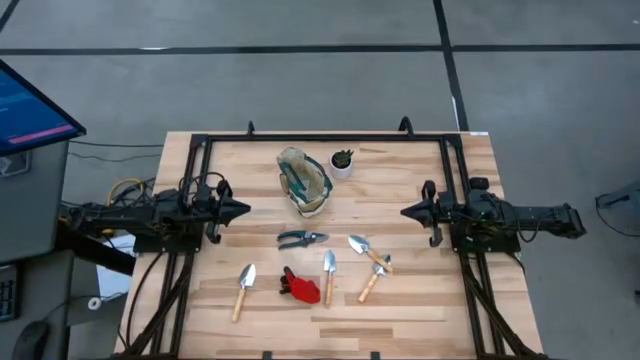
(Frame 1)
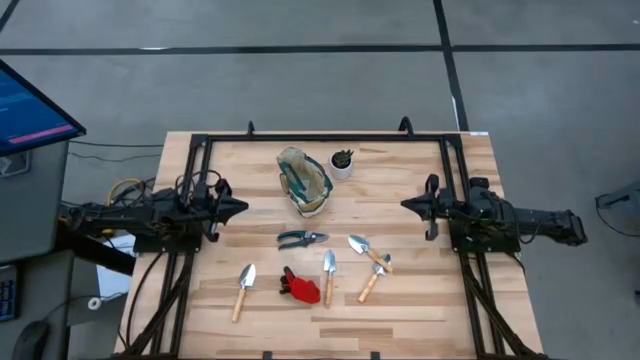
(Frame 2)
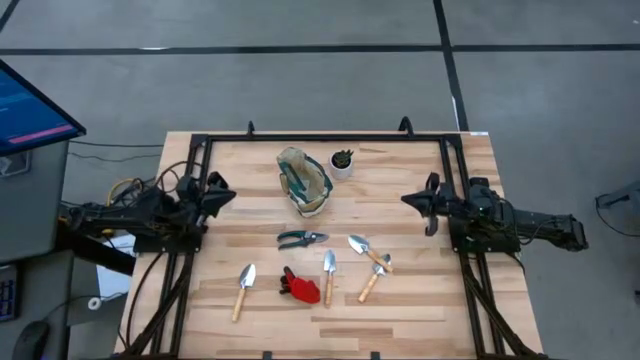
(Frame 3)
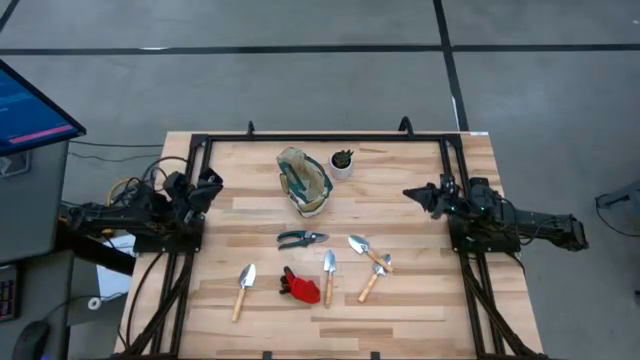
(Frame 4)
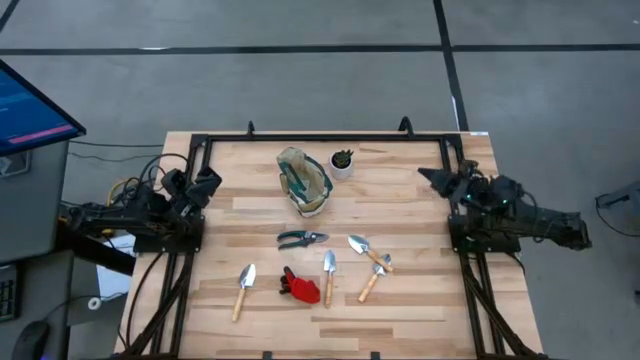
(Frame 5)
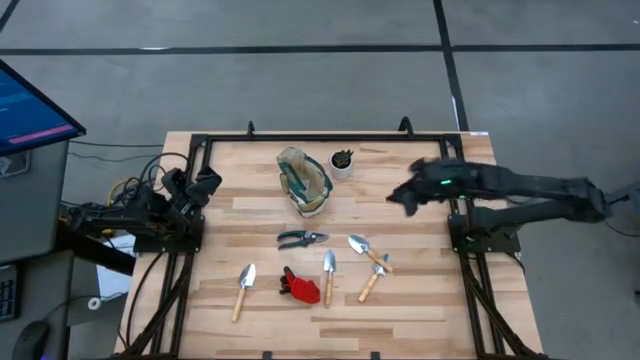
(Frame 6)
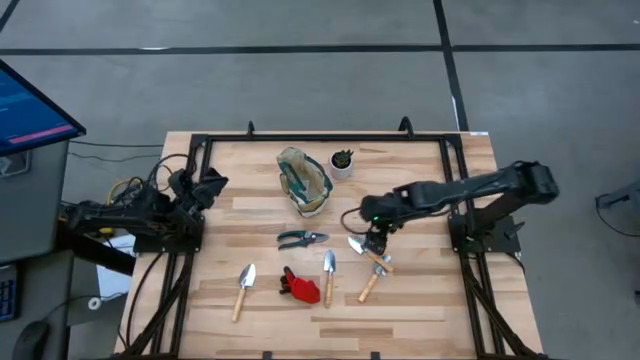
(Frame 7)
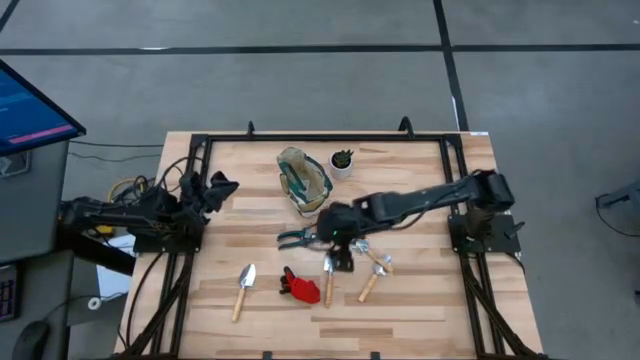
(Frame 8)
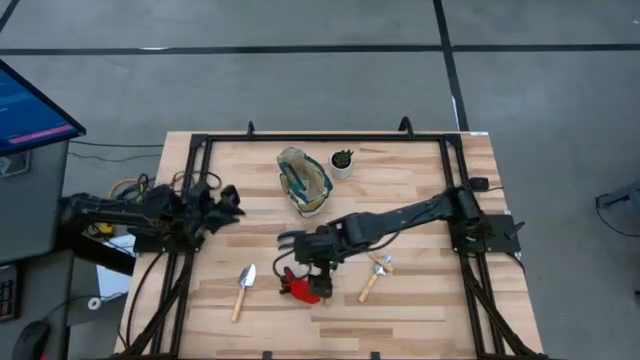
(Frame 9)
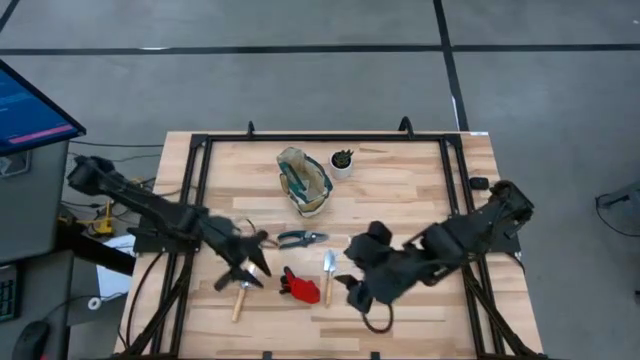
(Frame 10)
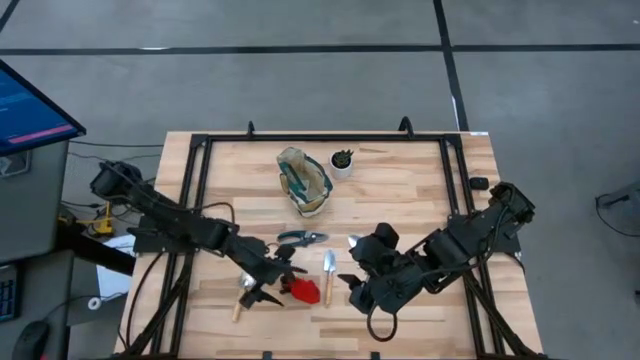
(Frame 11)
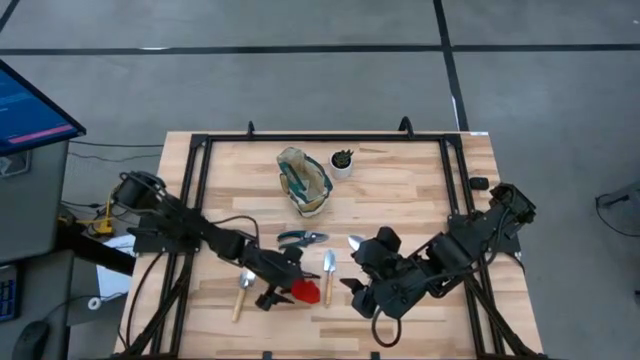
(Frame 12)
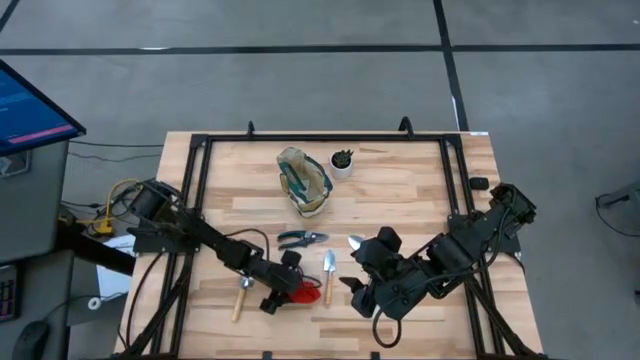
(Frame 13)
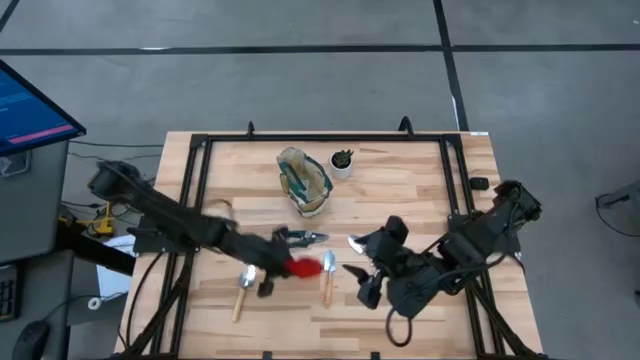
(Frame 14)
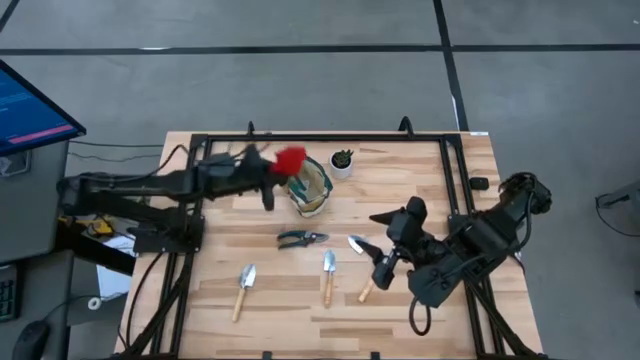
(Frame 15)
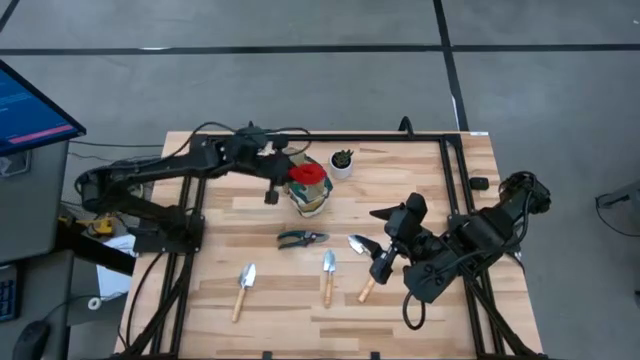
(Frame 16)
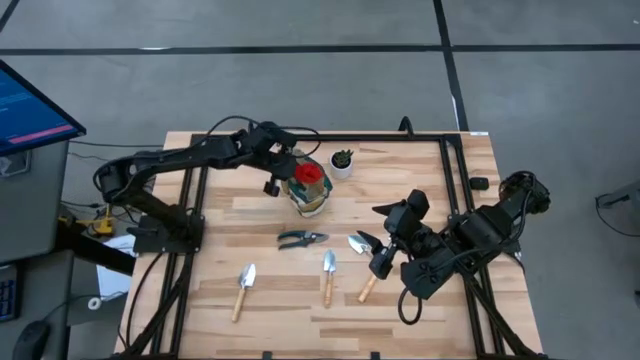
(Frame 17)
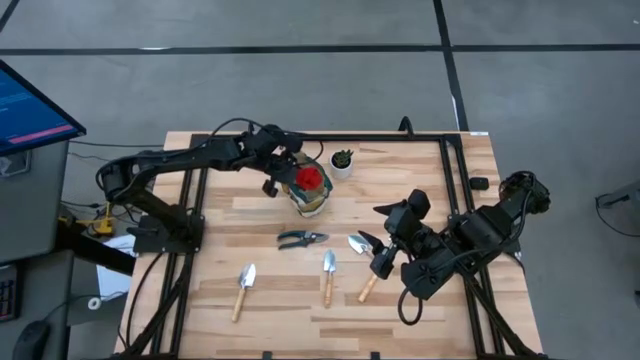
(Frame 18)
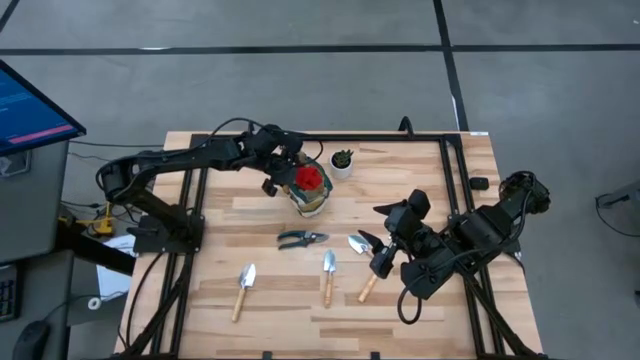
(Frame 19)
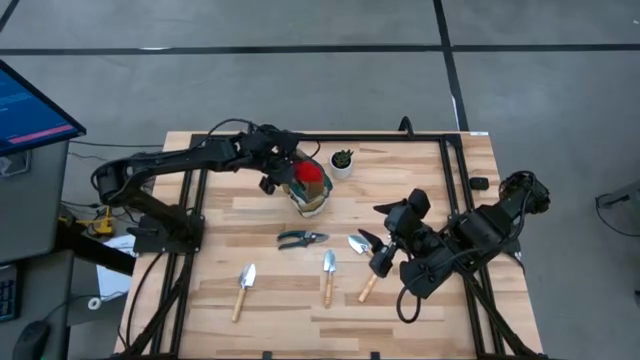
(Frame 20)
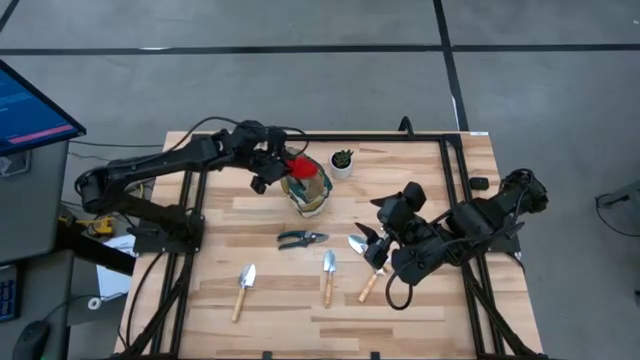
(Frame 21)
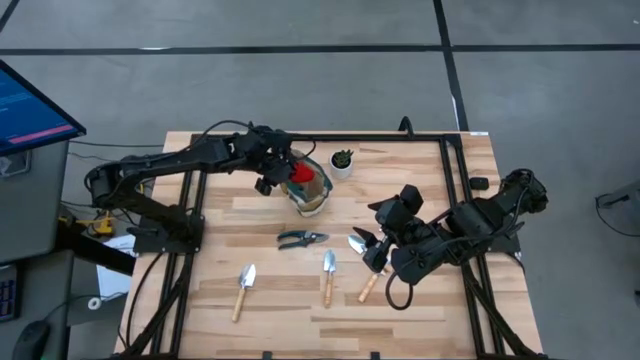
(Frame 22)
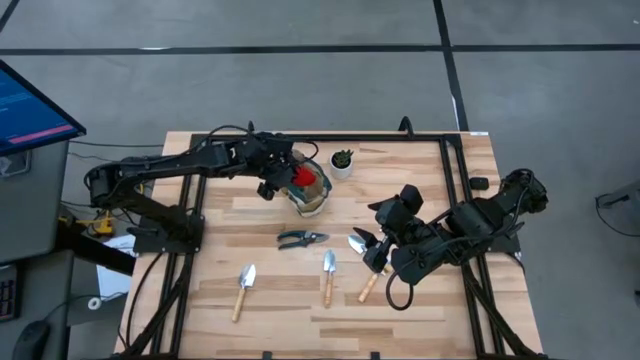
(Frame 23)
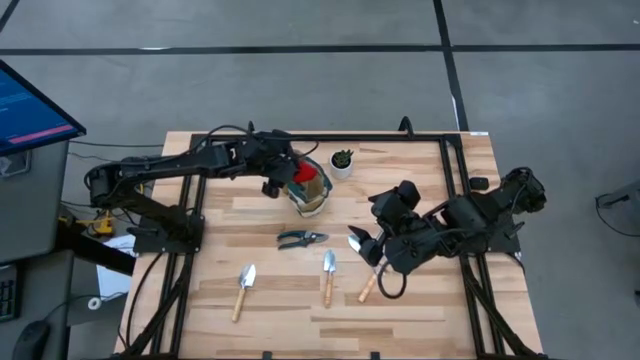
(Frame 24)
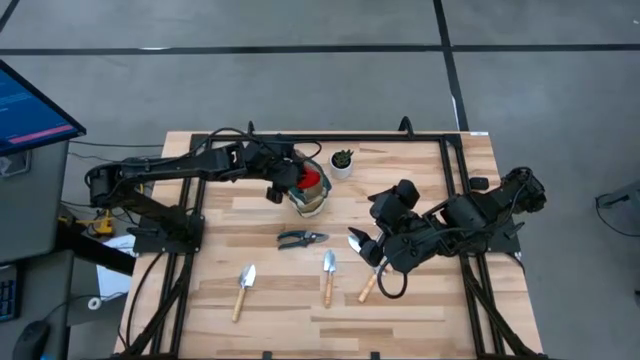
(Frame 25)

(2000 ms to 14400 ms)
Task: Pick & Place Garden tools in Gardening bag
Put the red gloves into the white gardening bag

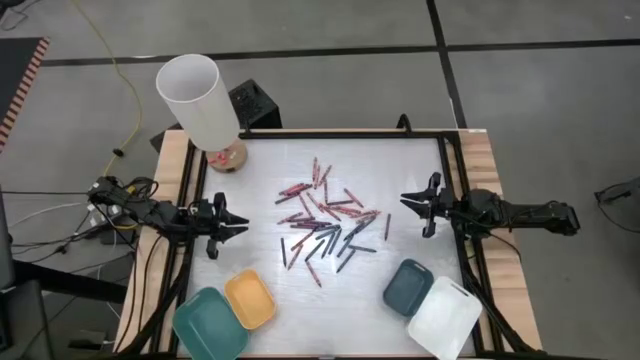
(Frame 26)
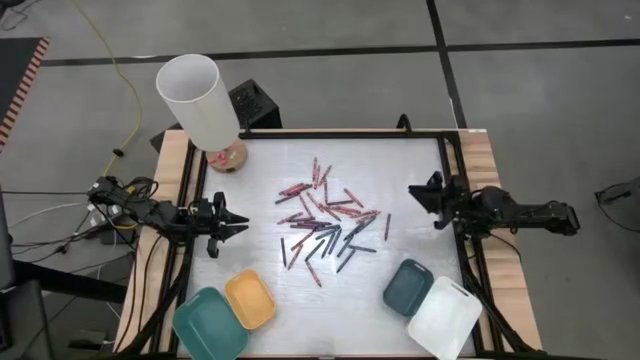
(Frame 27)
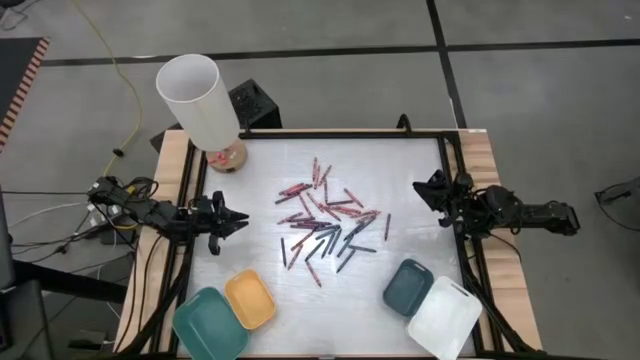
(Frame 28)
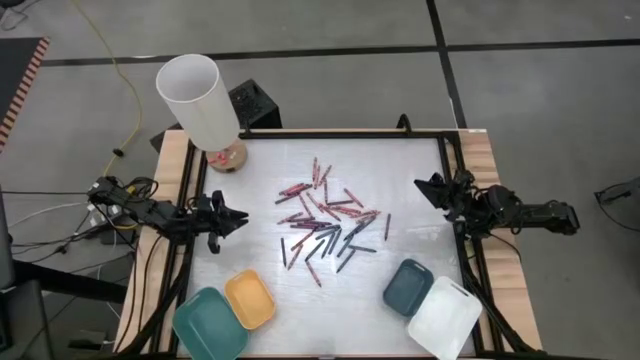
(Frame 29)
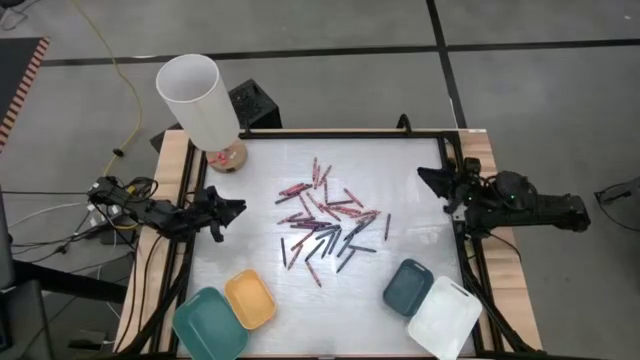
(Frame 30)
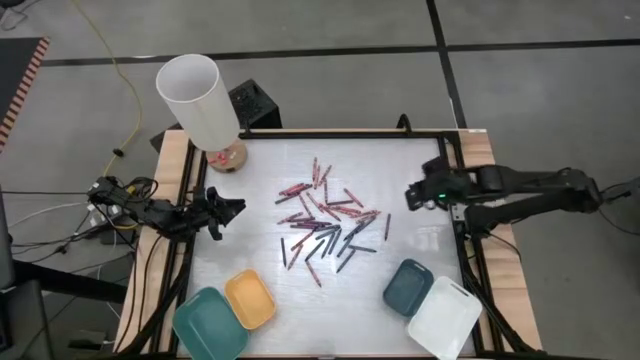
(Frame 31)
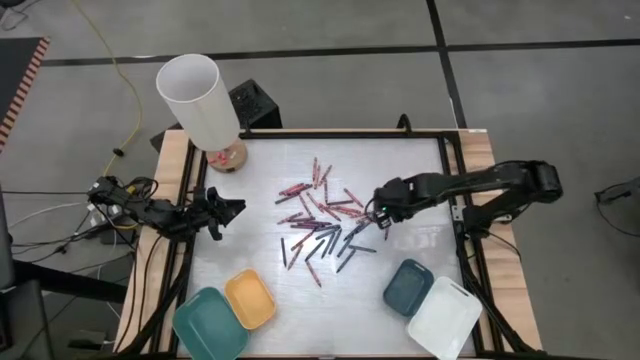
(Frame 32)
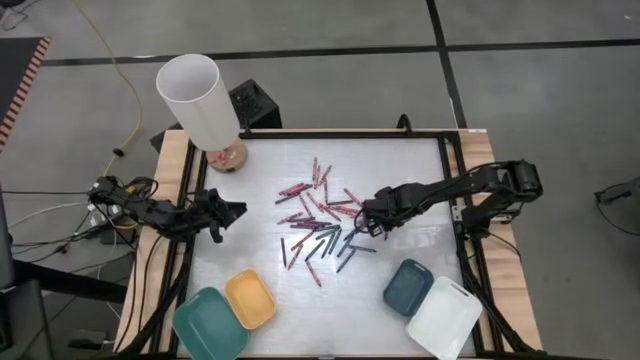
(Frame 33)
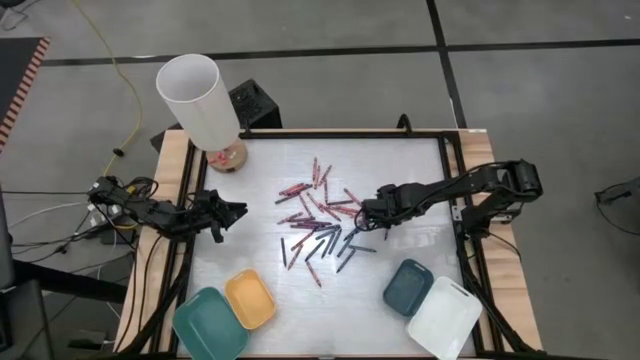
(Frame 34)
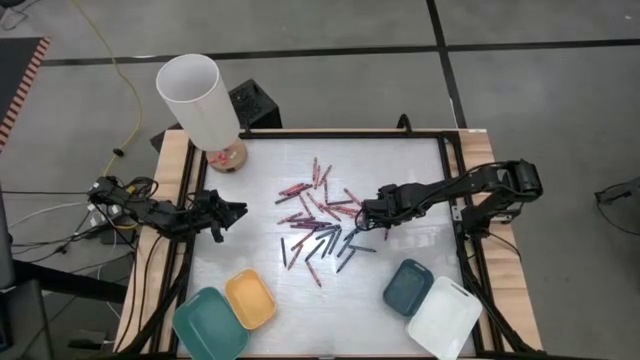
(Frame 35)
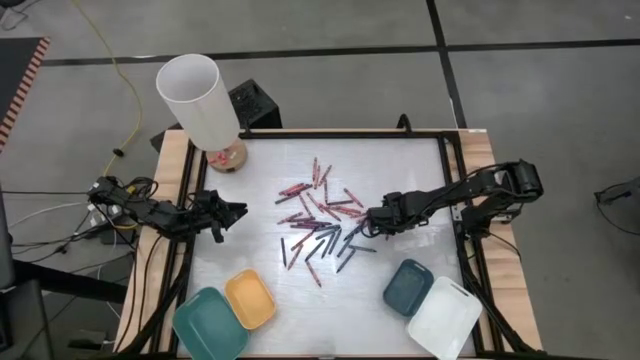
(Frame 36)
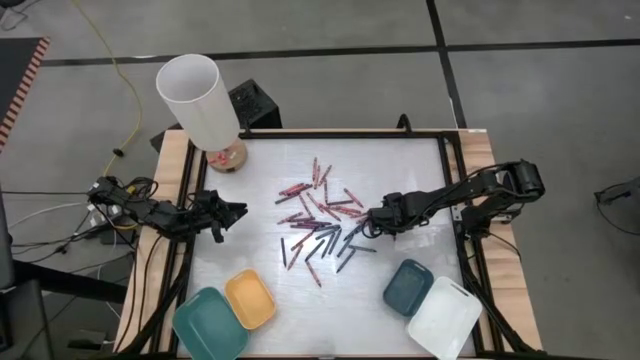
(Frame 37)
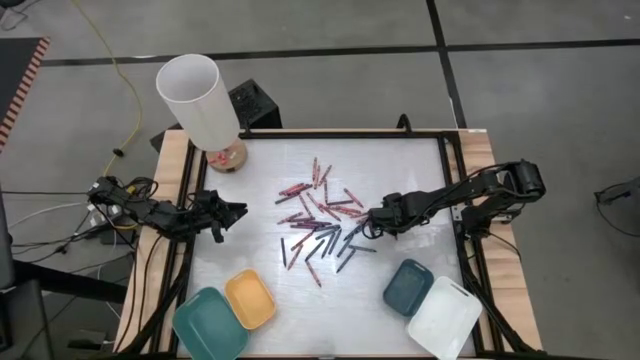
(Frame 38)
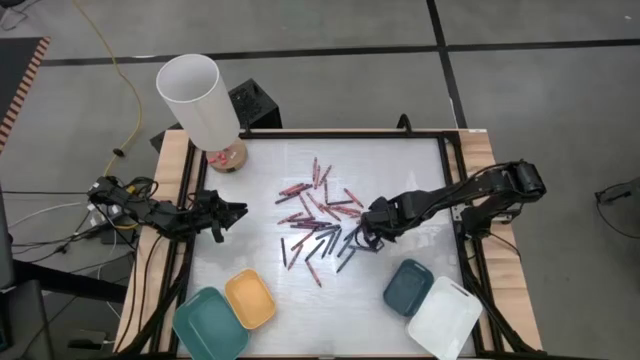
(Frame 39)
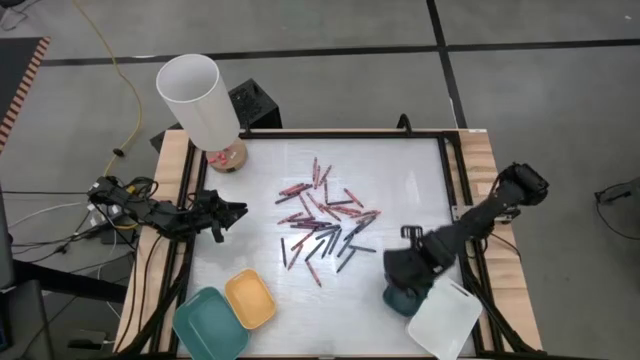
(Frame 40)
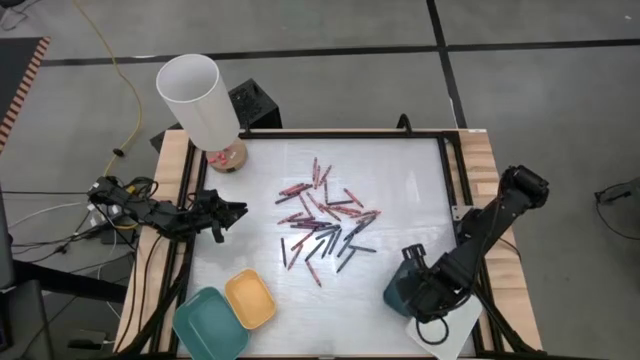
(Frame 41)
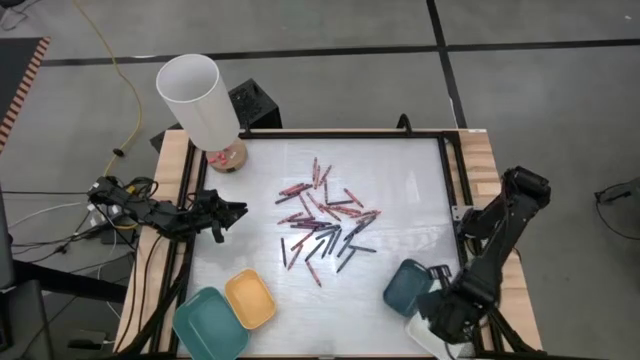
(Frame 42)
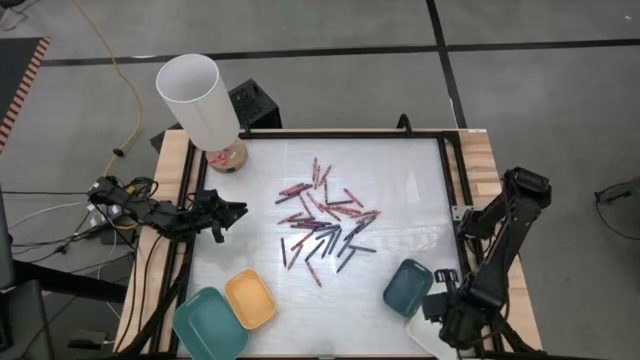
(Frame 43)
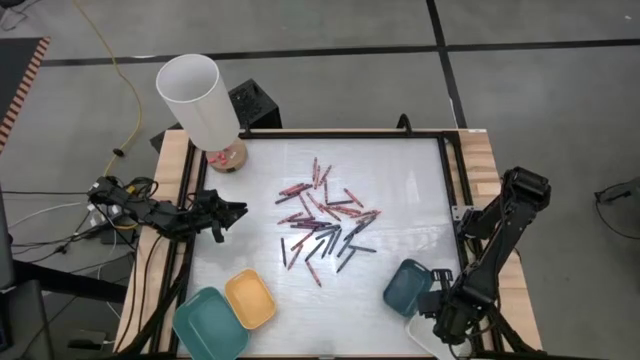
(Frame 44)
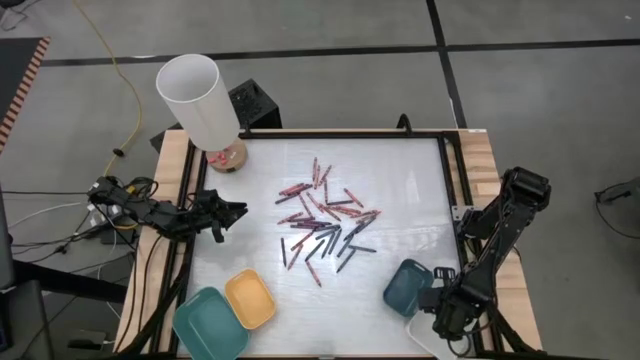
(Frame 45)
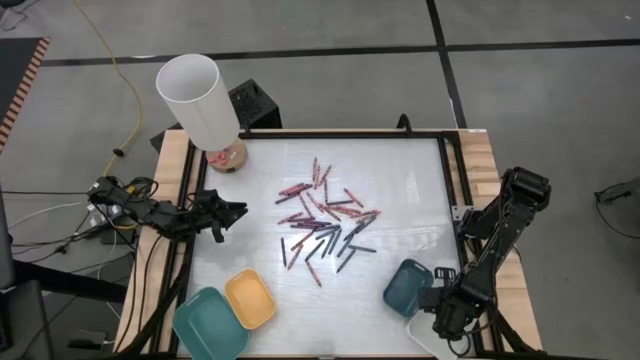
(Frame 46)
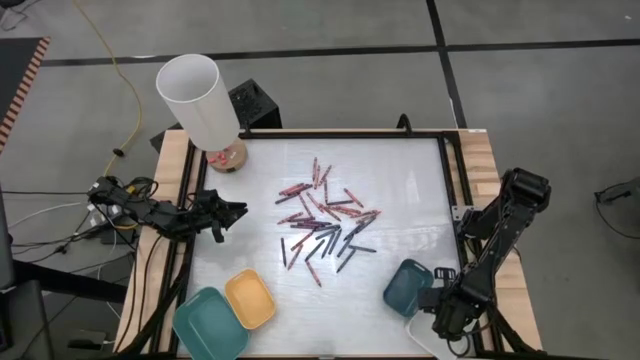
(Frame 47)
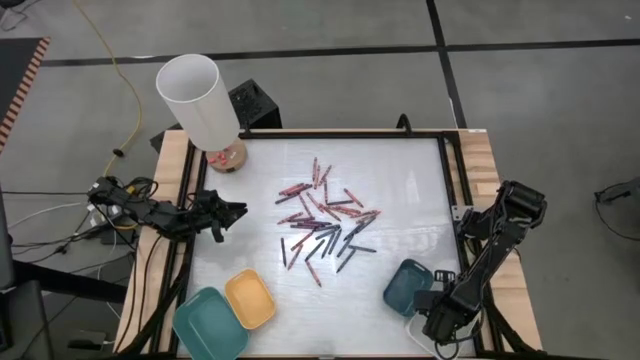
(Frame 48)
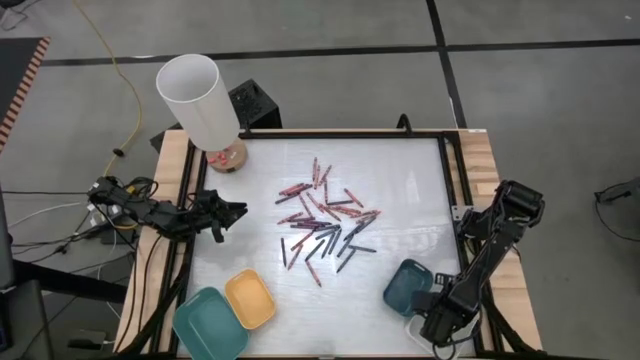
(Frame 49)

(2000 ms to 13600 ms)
Task: Sort crayons
Put the purple crayon into the white bin
